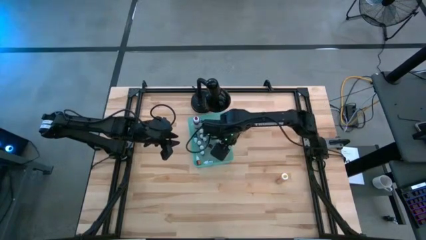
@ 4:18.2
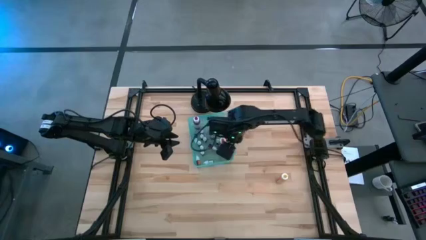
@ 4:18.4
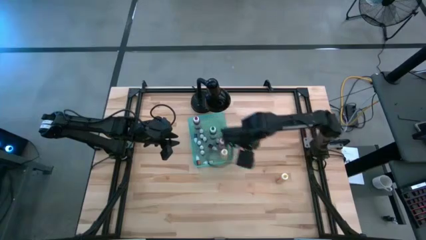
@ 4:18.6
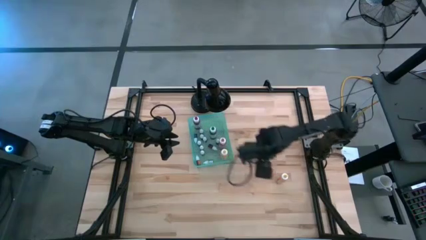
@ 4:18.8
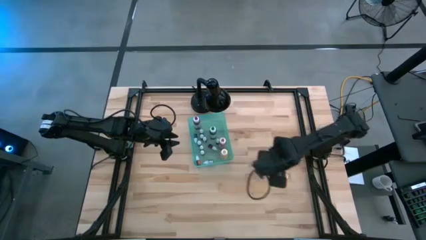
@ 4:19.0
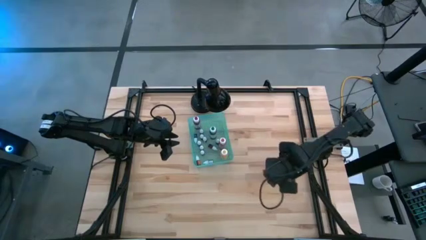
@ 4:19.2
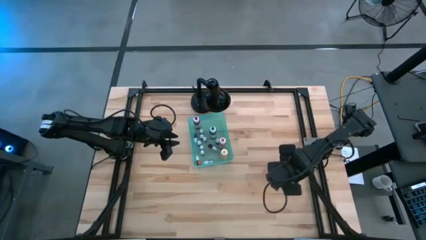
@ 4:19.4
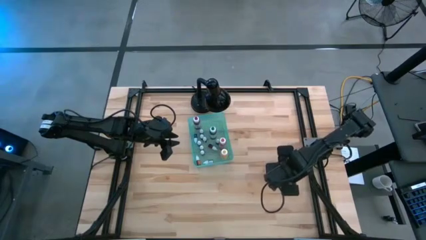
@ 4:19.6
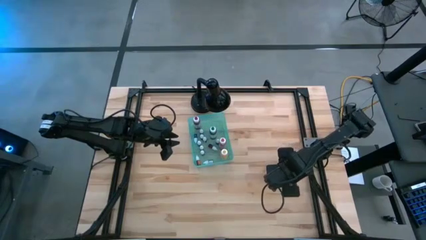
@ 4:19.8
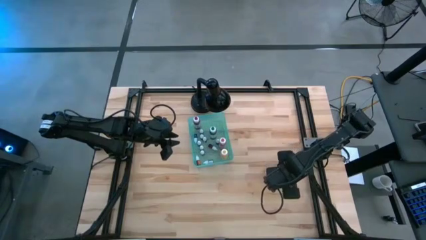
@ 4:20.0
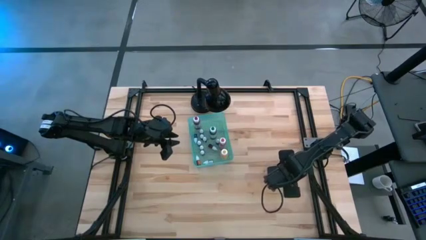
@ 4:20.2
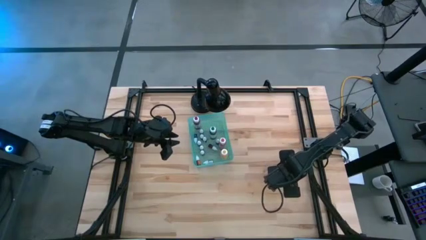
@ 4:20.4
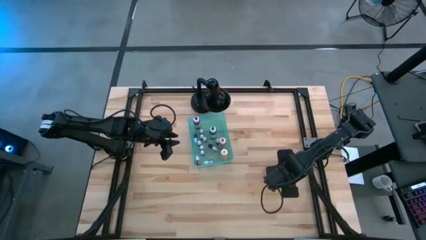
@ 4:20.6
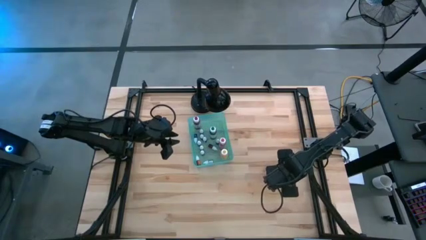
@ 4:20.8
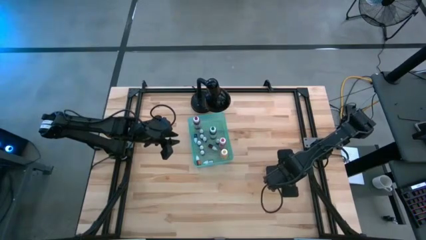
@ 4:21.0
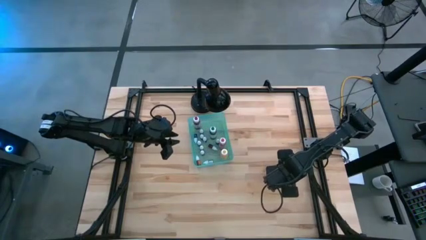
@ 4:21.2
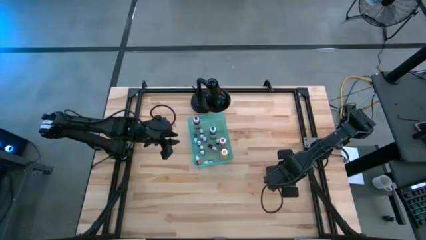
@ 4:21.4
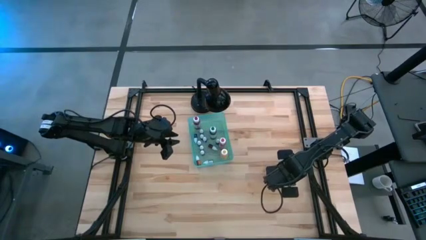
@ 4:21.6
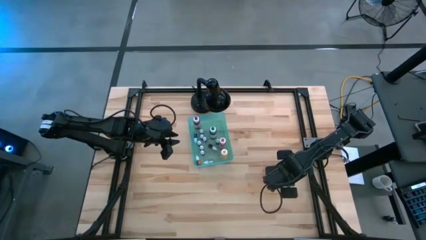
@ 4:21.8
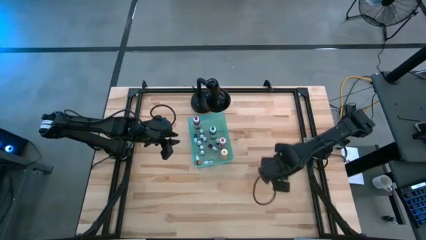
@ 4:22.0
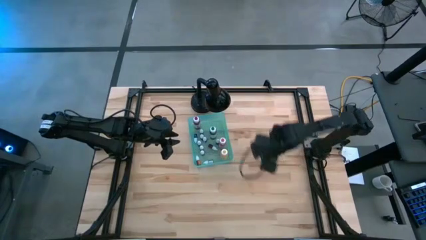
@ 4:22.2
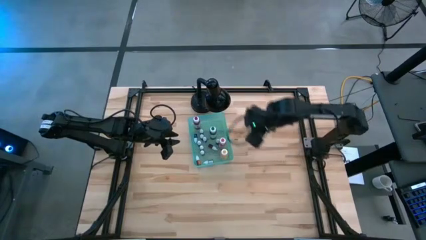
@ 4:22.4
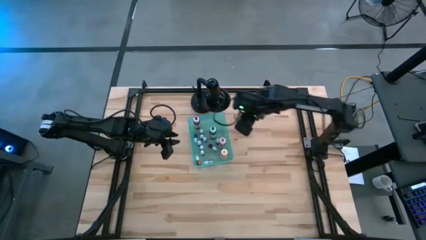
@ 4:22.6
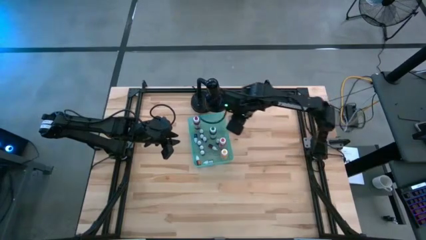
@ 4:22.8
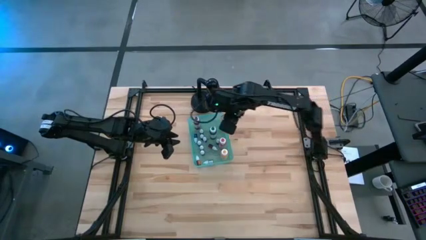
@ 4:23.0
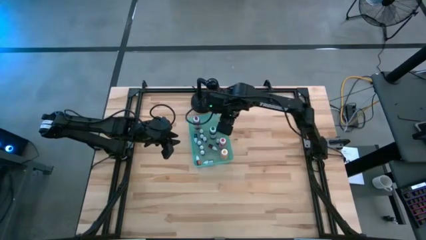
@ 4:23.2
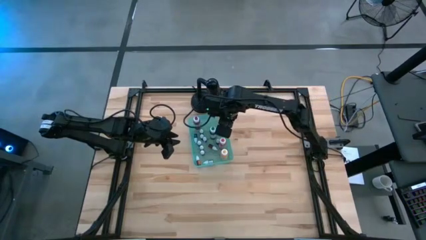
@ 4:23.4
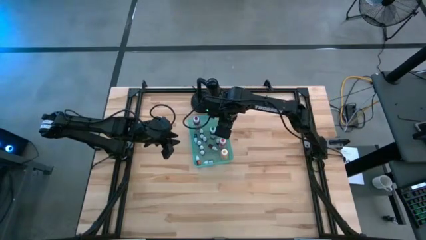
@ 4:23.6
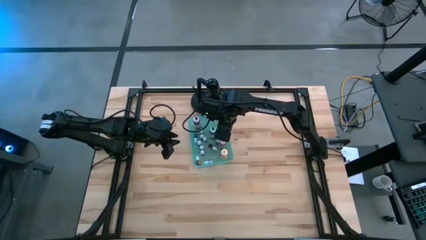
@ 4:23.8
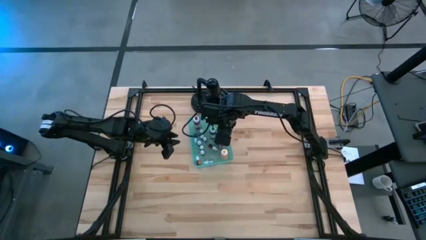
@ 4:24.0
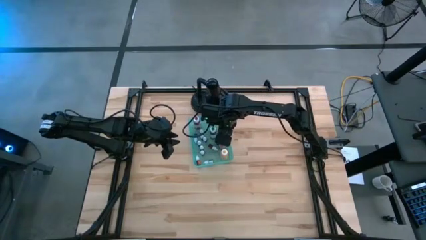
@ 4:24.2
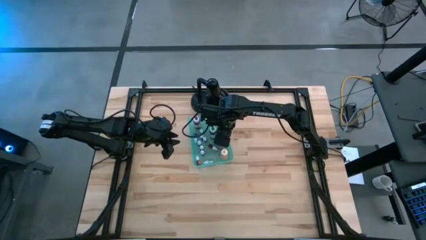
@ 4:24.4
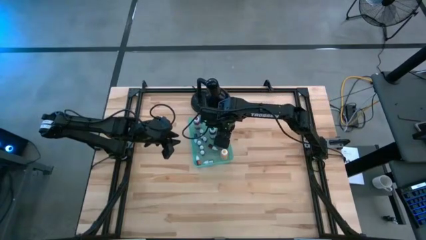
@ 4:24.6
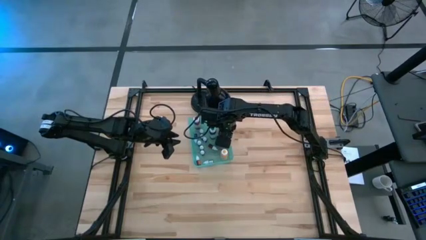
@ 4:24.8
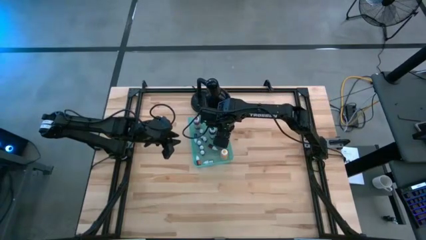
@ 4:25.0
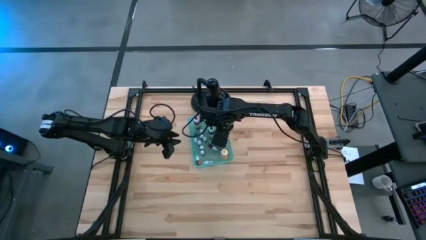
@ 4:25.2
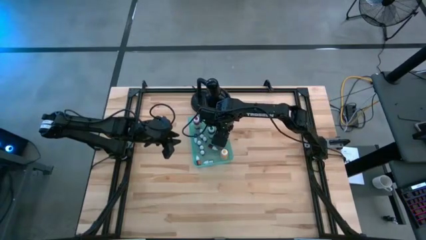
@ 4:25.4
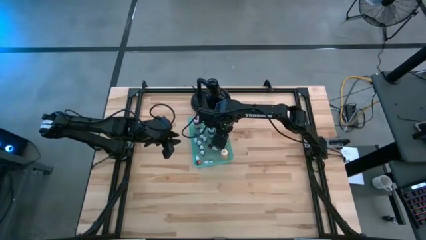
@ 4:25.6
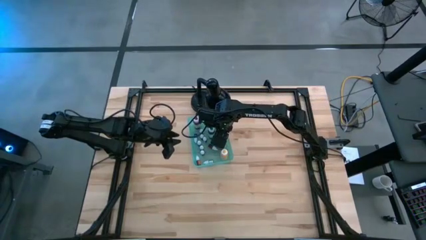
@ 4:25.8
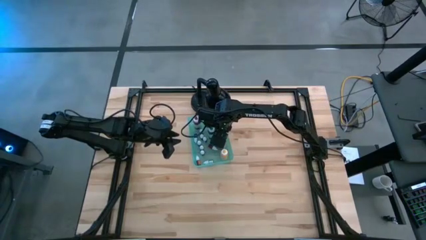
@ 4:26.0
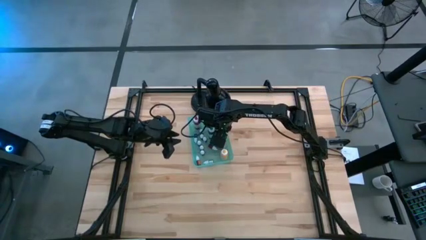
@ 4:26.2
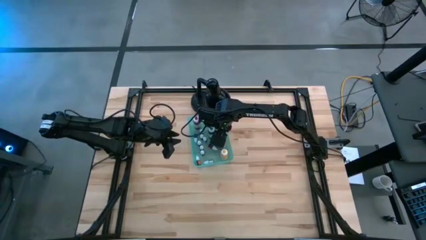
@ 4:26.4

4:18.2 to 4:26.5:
Task: Pick & Place food coloring
Put the large yellow food coloring bottle into the green bin

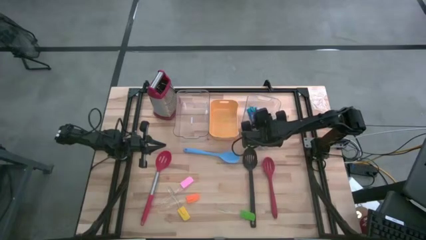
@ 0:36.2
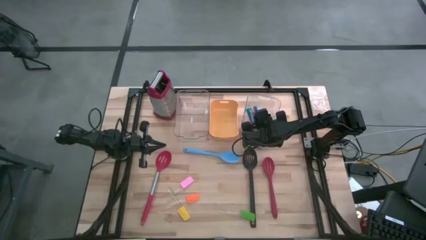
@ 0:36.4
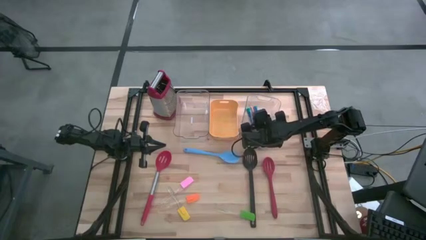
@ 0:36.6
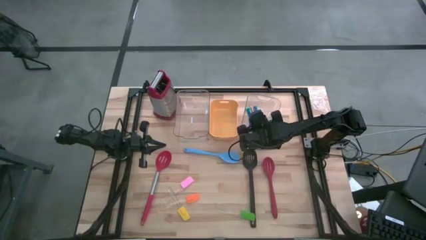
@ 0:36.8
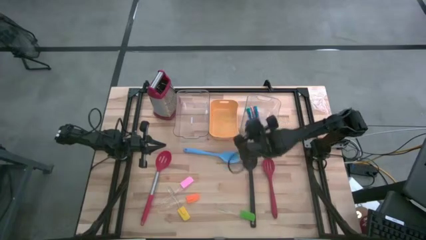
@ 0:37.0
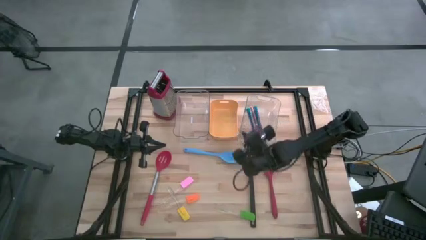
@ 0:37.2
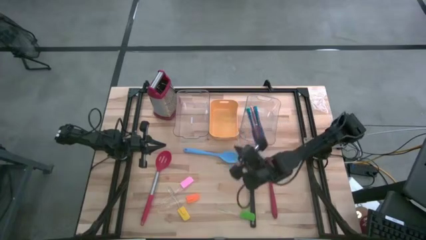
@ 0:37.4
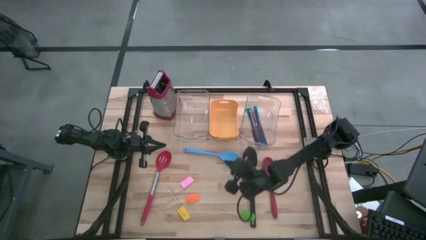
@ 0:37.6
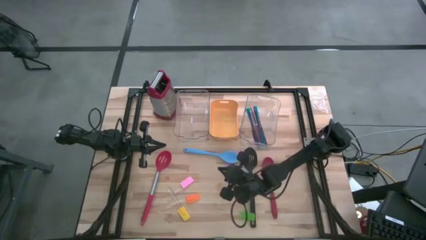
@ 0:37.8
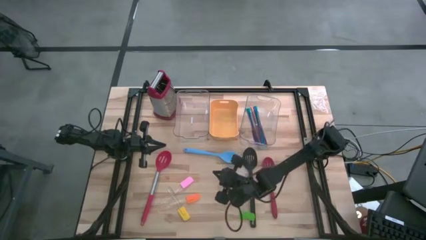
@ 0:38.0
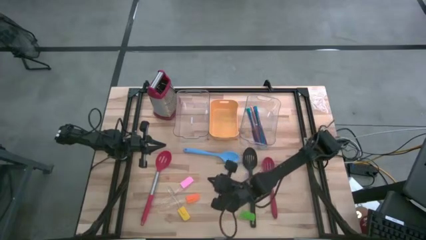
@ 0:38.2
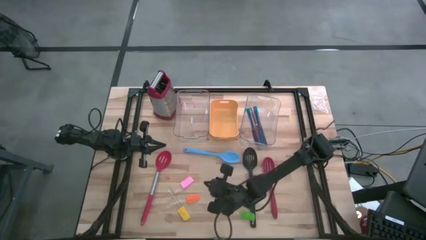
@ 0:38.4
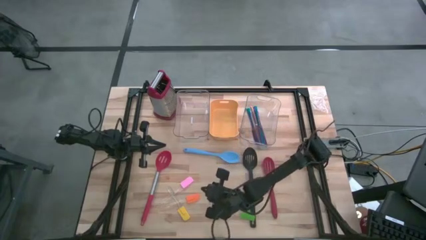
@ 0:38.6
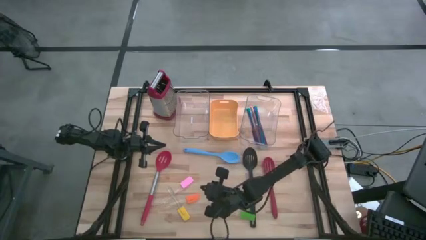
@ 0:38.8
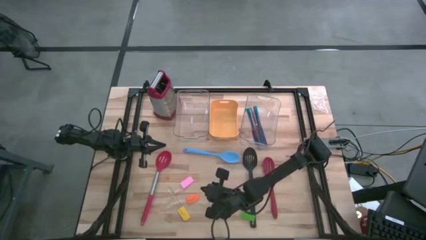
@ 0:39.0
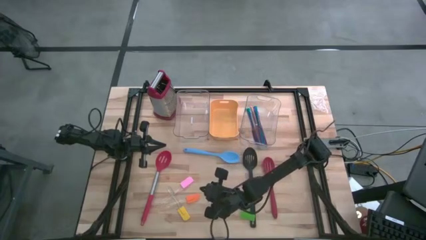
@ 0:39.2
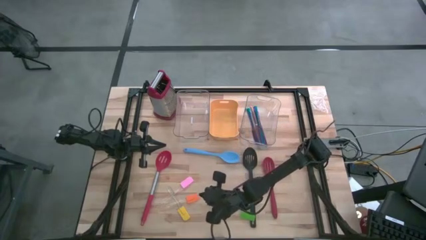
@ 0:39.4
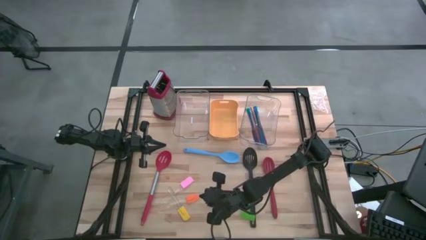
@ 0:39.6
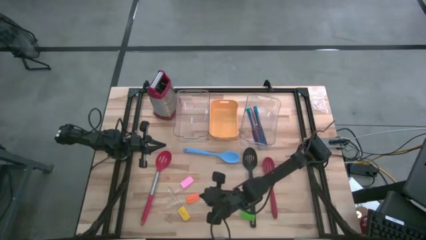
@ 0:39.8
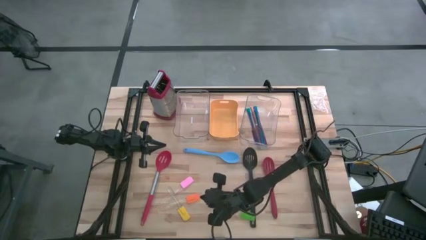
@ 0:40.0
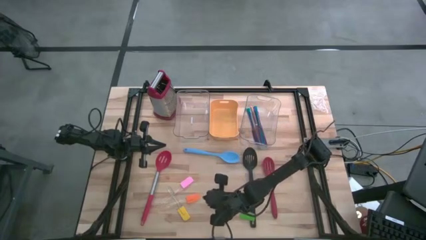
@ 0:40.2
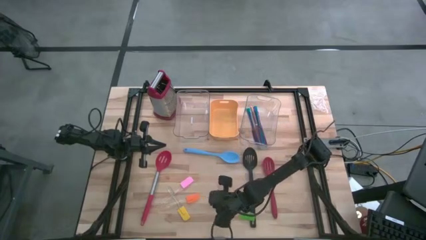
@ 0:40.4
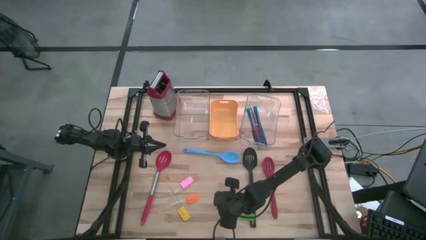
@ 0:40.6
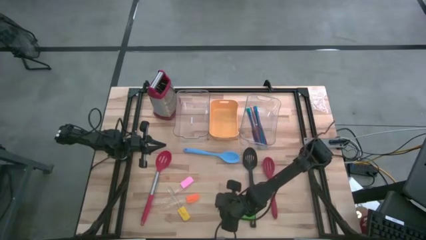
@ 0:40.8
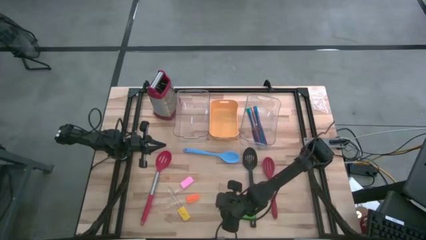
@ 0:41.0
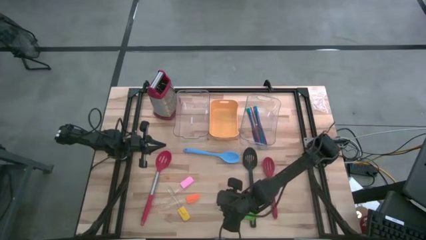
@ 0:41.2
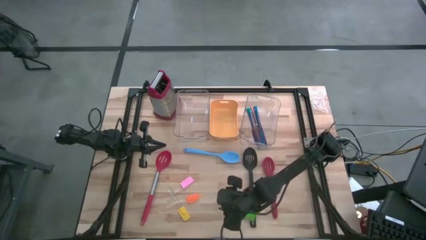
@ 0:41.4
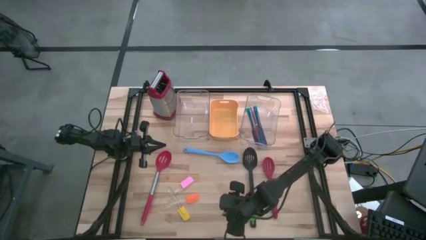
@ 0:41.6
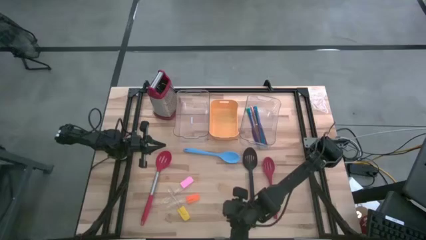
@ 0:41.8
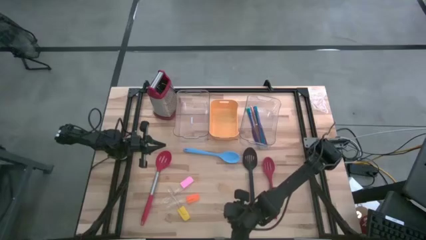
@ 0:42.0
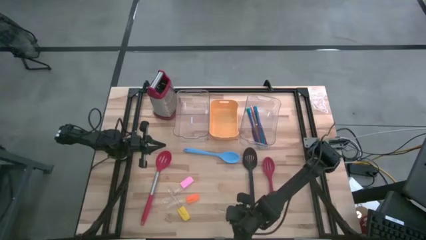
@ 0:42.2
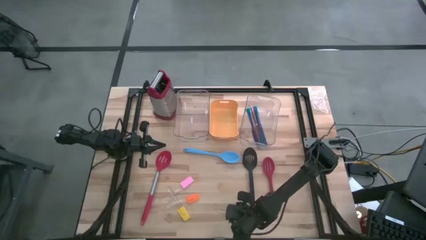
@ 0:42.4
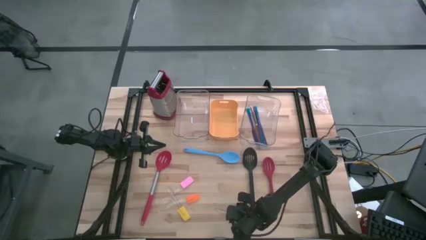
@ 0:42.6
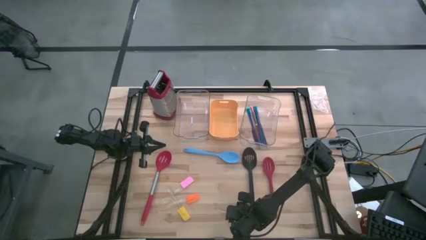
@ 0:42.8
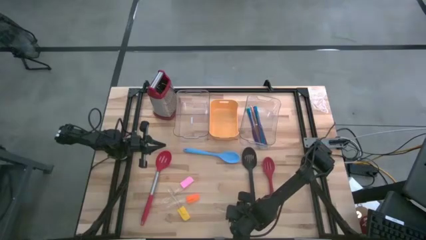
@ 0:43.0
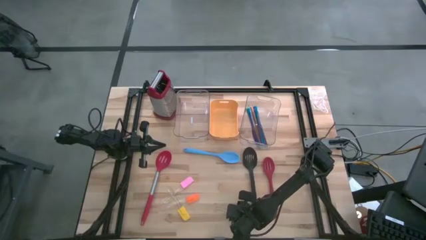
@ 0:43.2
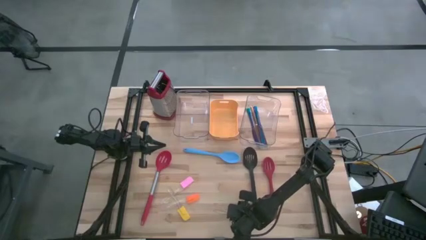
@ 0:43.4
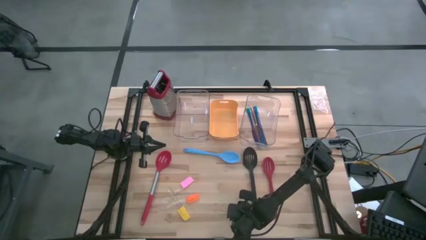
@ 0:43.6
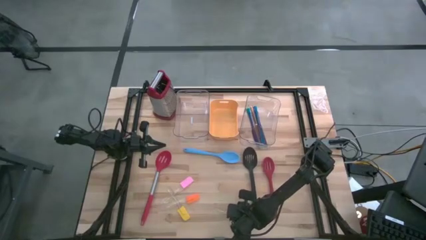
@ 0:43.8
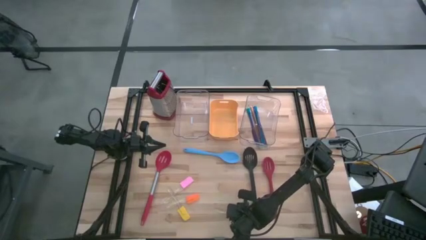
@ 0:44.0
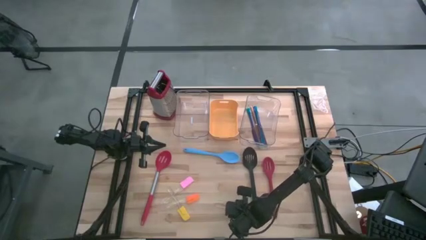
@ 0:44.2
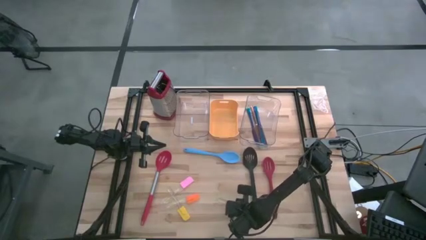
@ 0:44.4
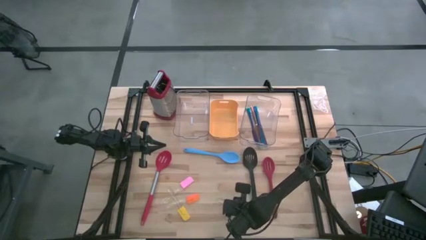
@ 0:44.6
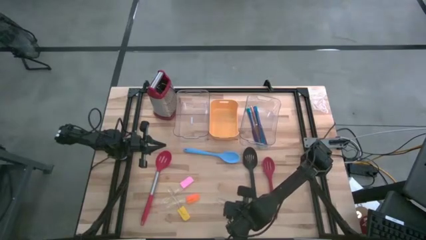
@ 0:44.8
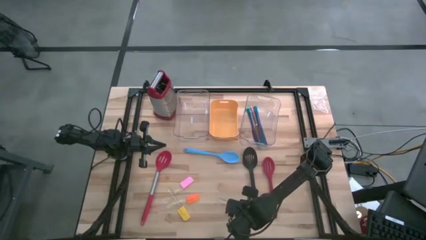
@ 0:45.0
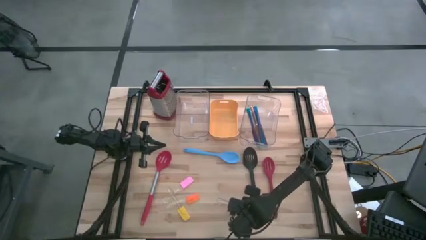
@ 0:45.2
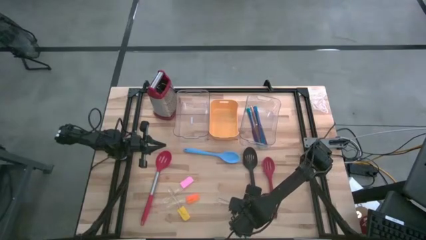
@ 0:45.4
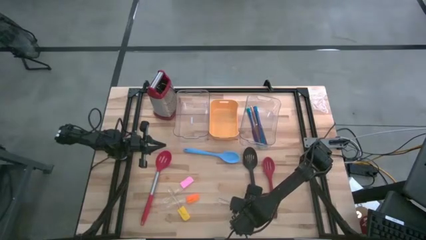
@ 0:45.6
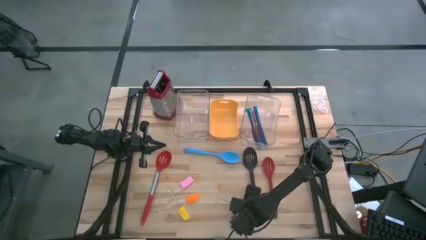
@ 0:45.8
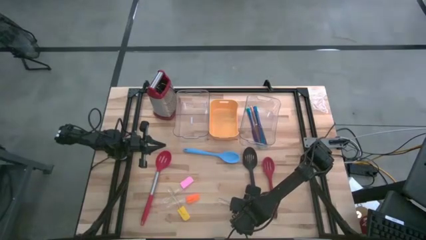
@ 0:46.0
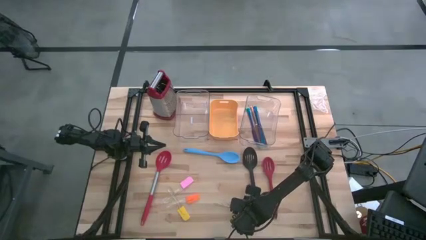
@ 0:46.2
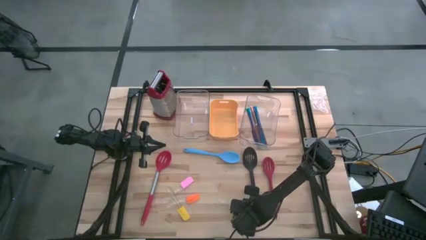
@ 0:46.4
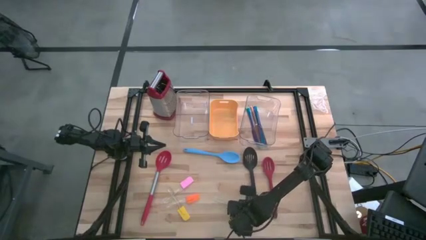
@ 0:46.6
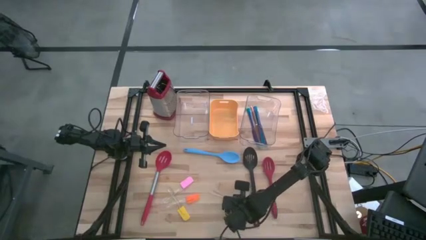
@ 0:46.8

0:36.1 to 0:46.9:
Task: Pick & Place Kitchen Items
Put the green spatula into the yellow bin
